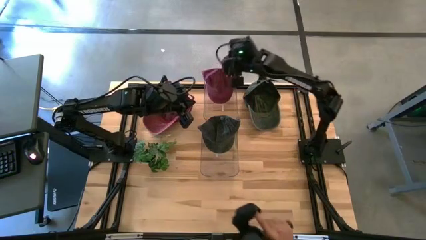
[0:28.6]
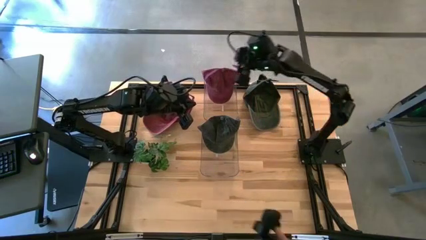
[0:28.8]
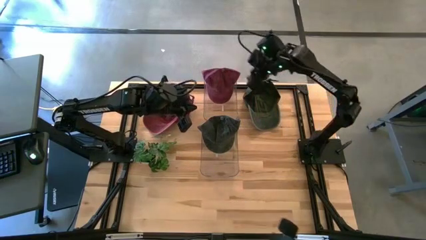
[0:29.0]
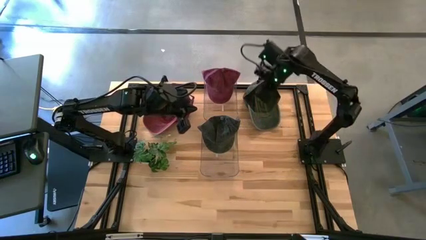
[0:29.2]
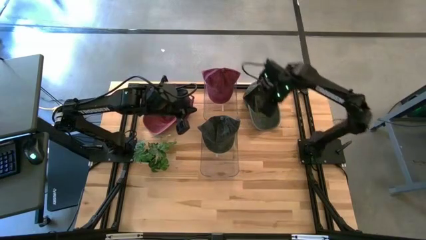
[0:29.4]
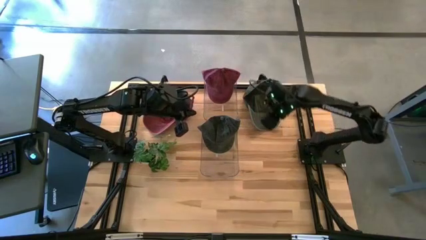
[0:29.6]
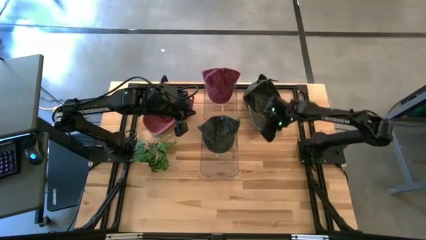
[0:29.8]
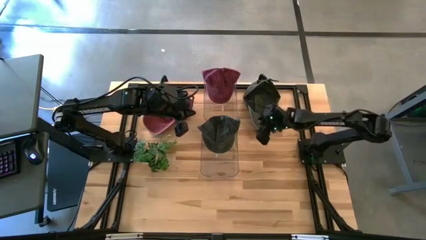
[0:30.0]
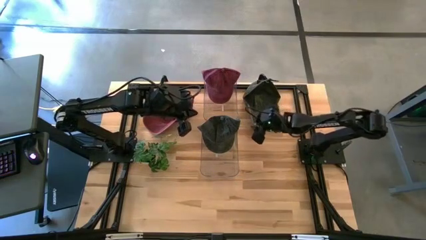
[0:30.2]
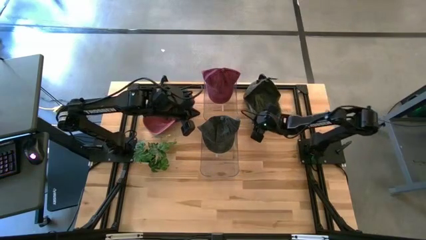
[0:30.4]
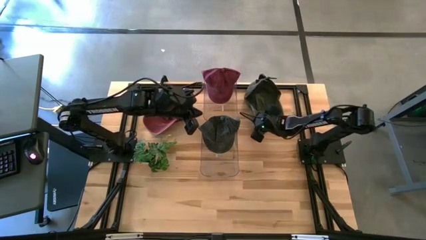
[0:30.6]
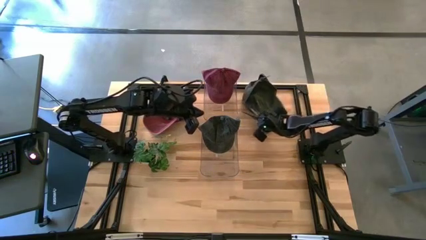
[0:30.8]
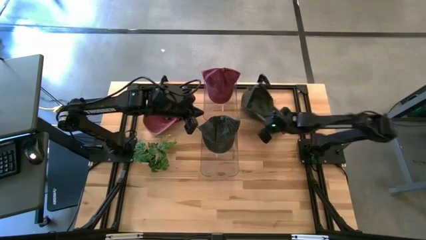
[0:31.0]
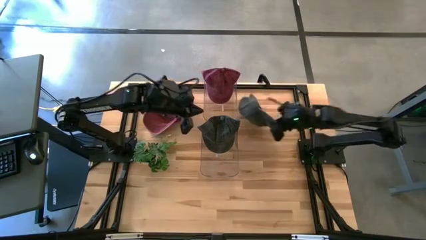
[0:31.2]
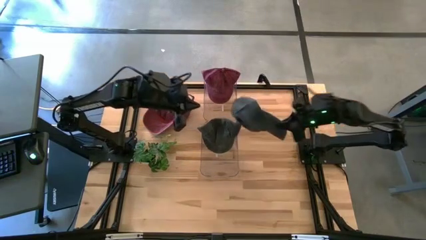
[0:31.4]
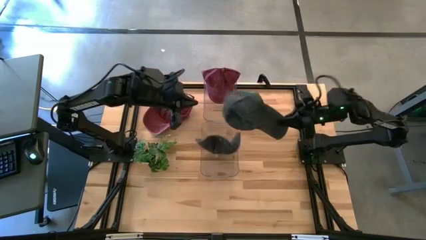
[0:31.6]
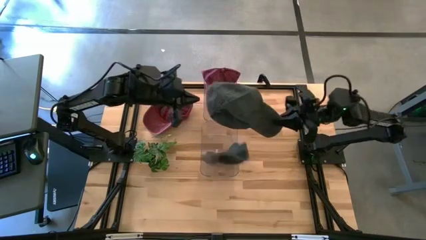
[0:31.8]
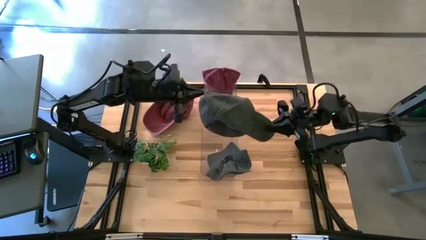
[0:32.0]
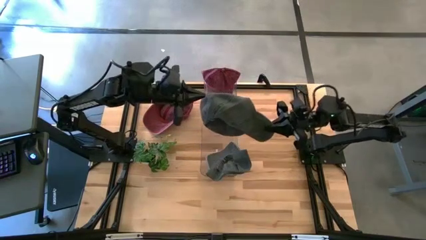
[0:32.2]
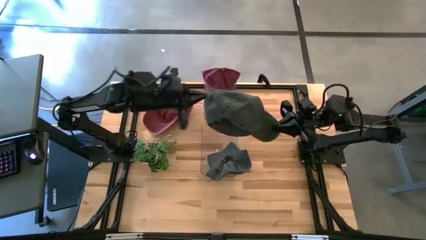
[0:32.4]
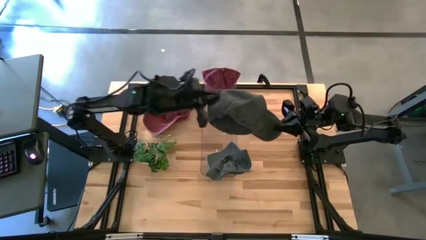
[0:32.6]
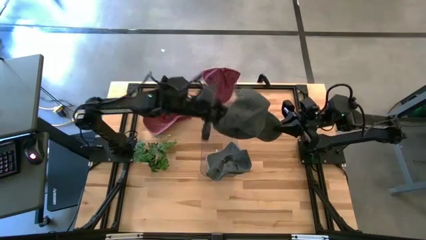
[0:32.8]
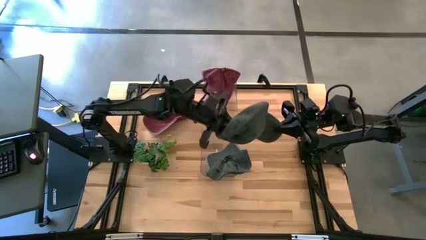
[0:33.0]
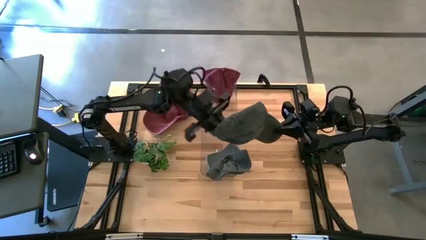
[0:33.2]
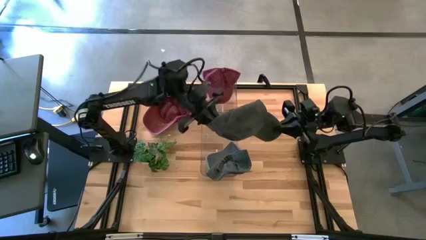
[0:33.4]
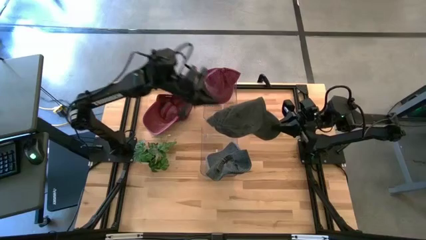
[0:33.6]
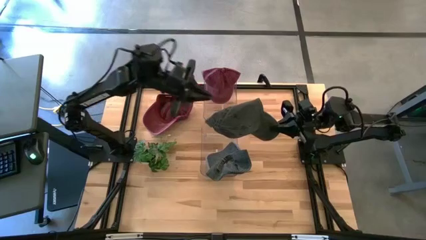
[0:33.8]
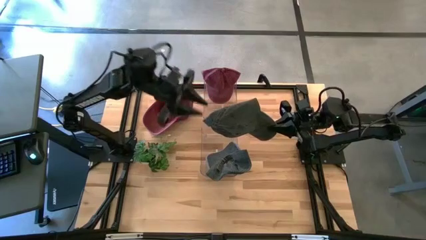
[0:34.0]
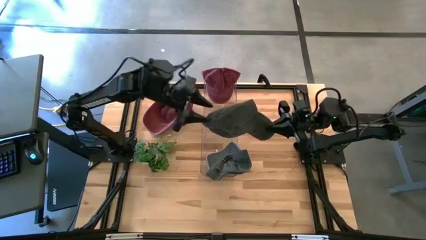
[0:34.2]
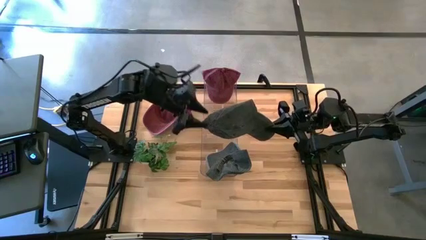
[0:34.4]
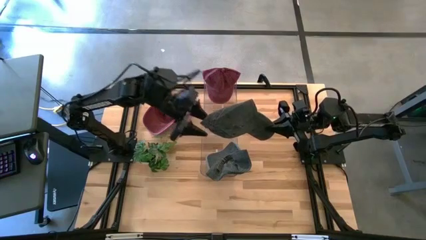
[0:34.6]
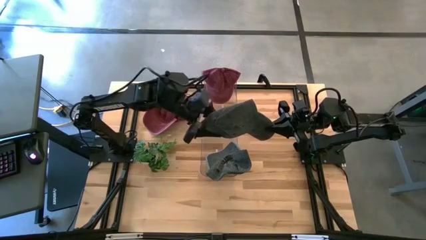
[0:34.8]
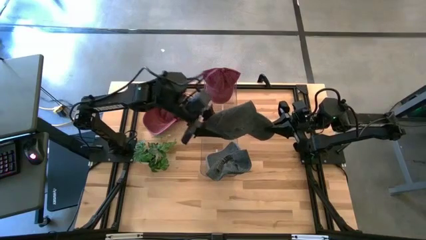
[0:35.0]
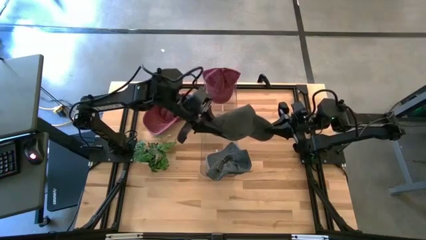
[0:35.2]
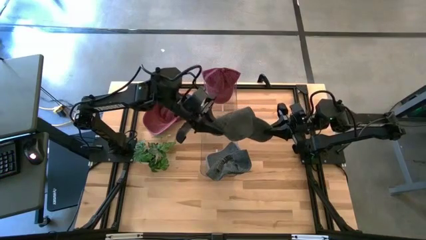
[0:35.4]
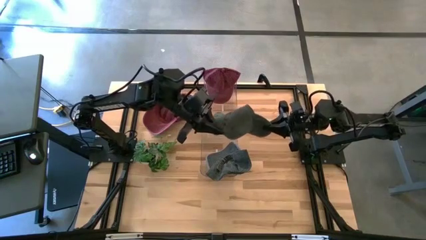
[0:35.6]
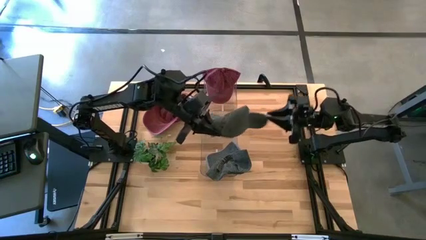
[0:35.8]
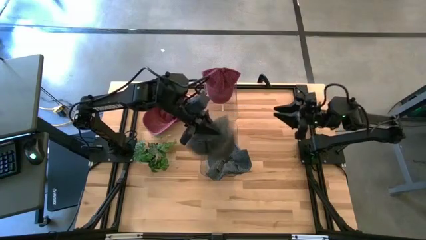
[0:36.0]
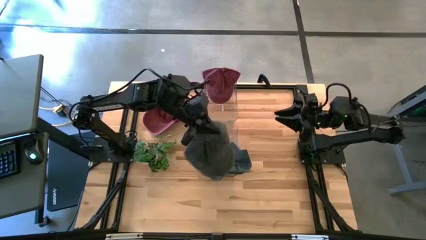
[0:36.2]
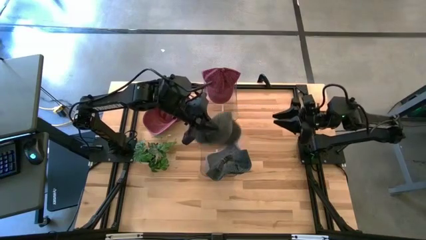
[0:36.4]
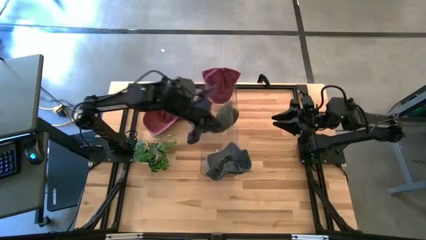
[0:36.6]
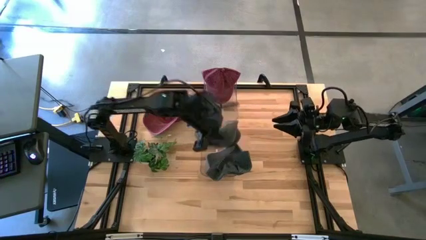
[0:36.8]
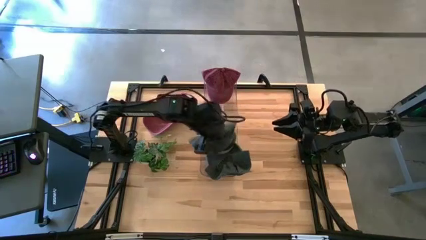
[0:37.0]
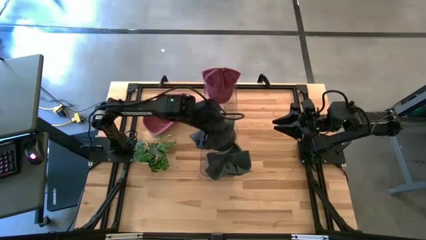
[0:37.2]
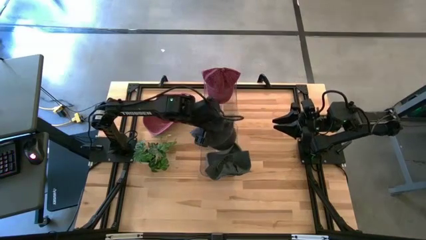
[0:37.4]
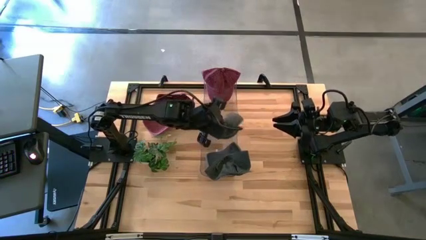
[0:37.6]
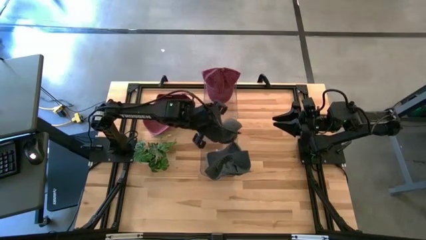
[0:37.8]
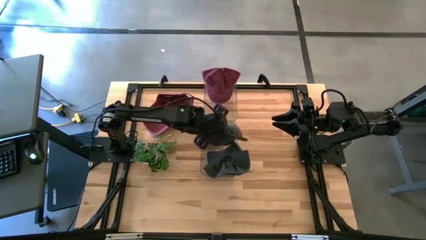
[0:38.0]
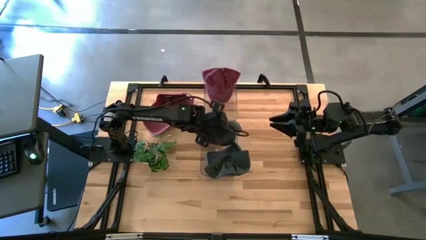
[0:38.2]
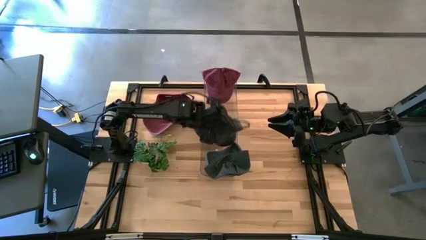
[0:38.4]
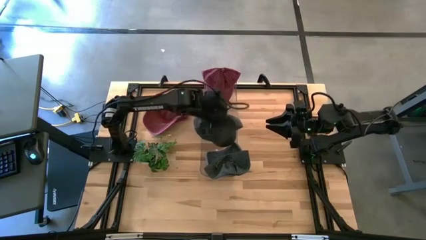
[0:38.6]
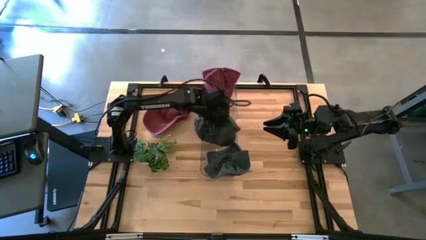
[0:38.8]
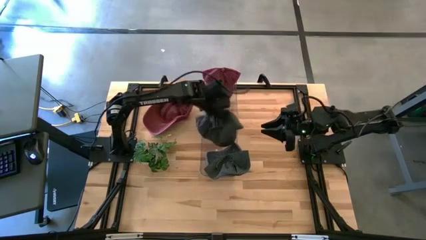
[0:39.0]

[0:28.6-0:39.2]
Task: Pick & Place hat
Put the black cap into the bottom transparent bin
